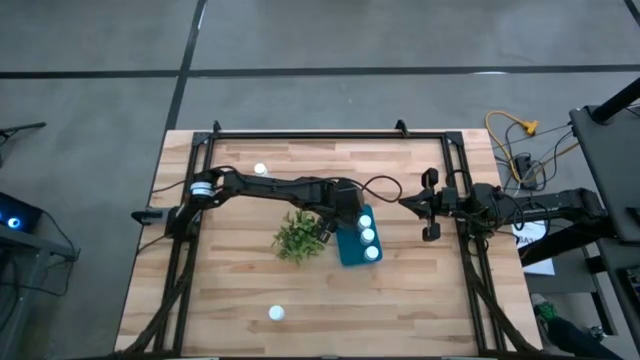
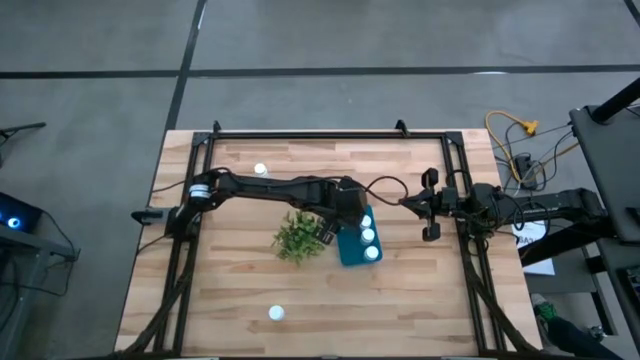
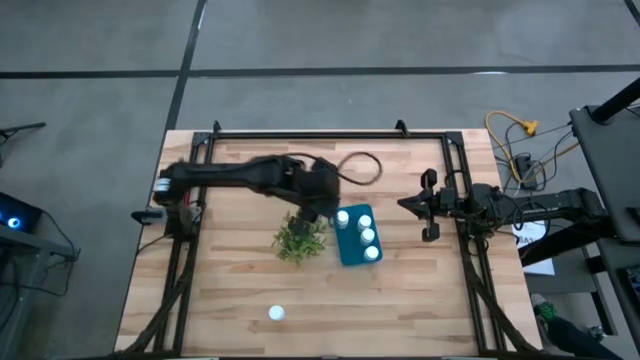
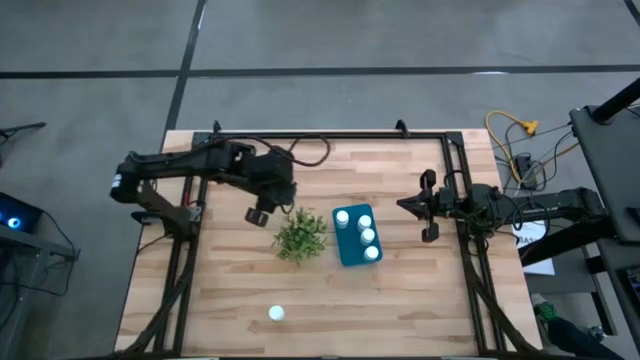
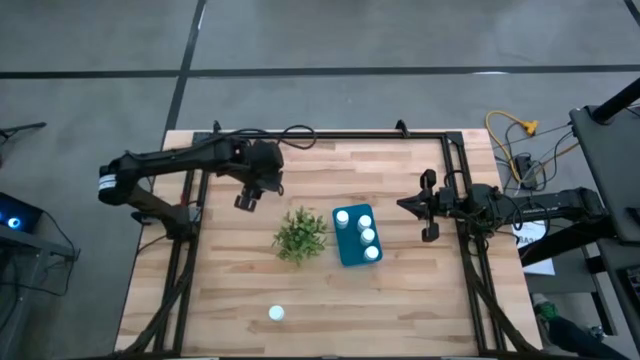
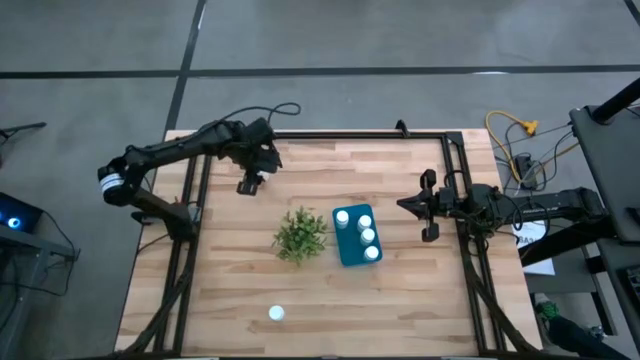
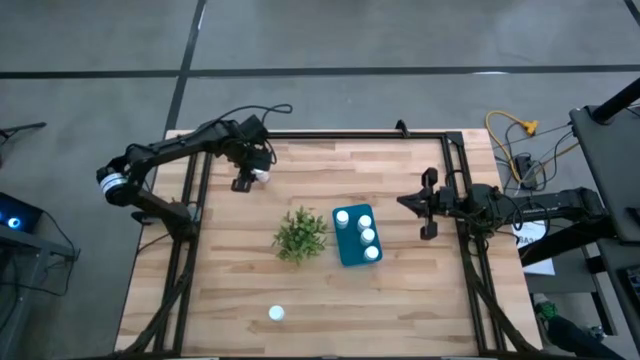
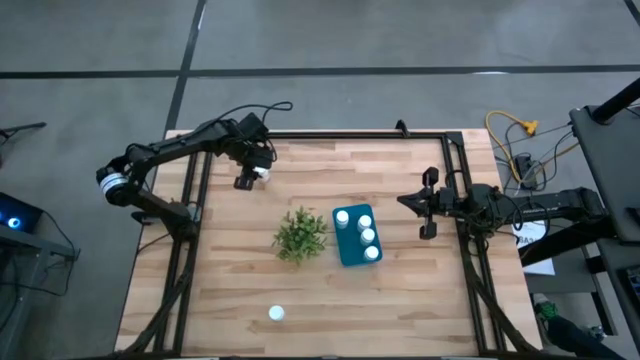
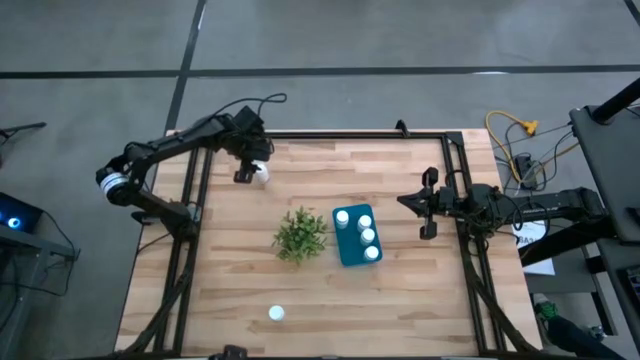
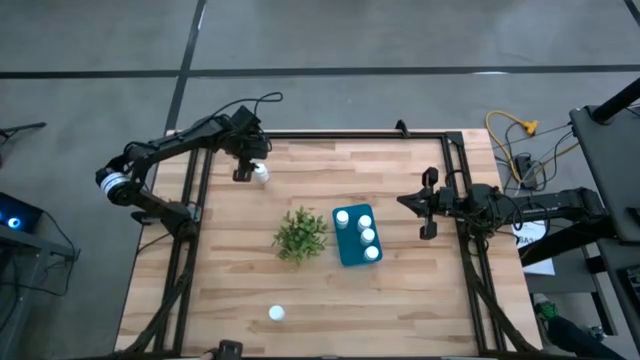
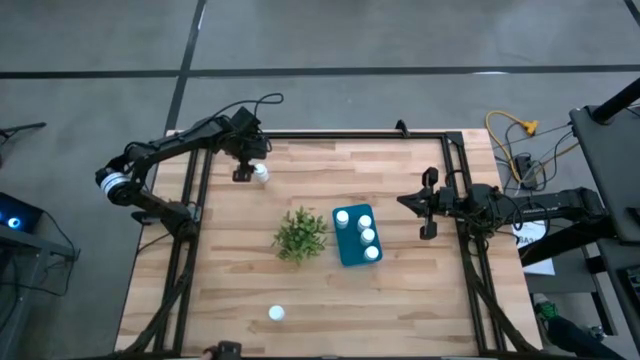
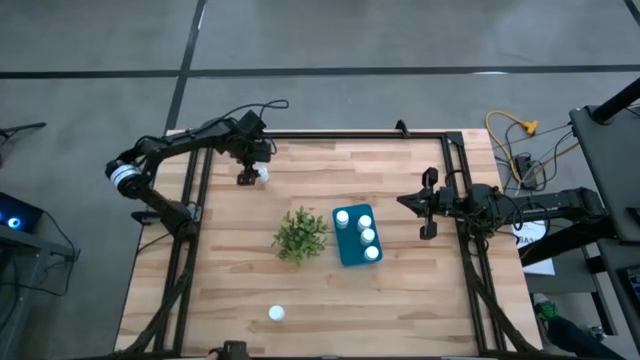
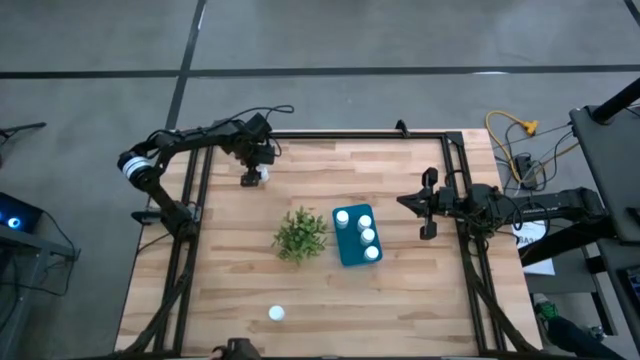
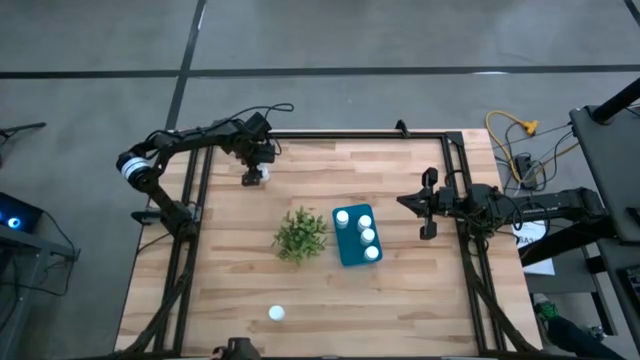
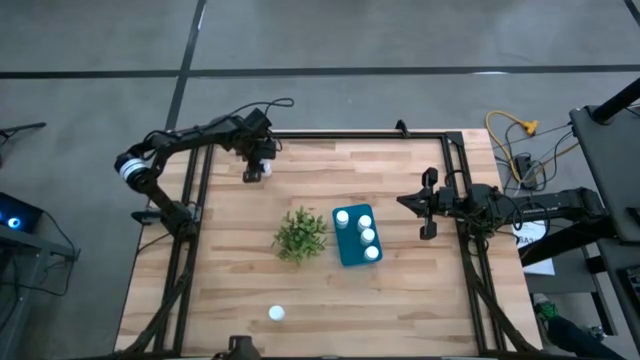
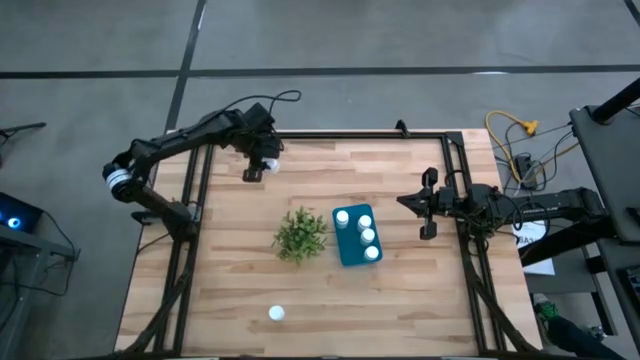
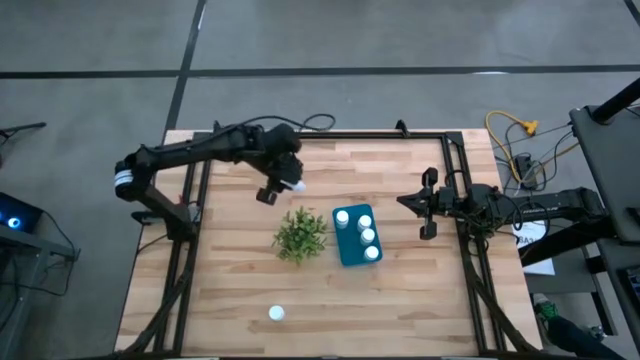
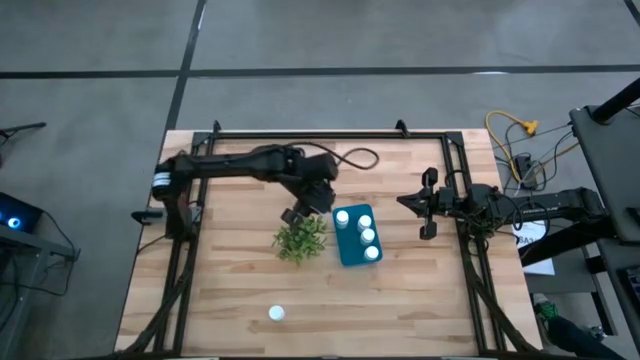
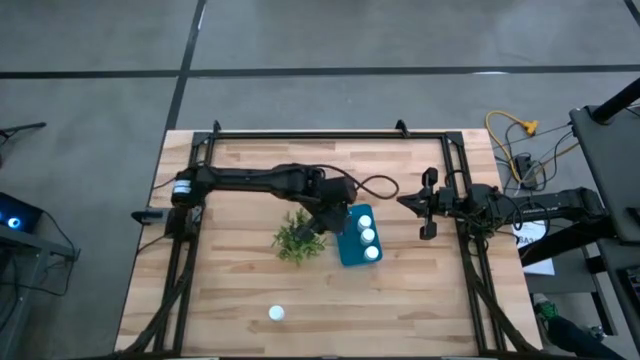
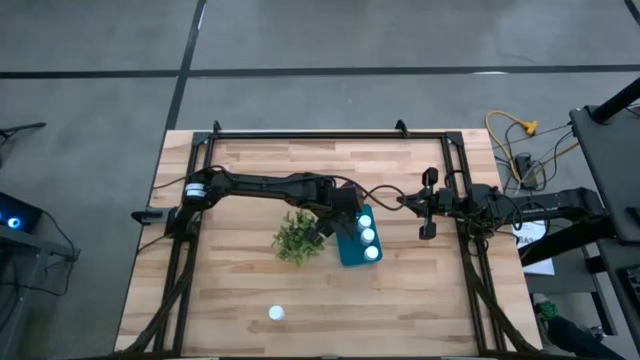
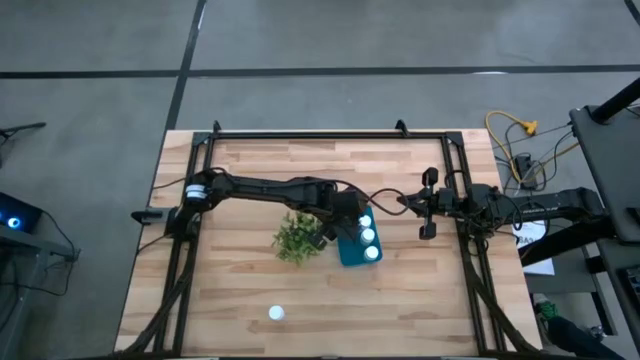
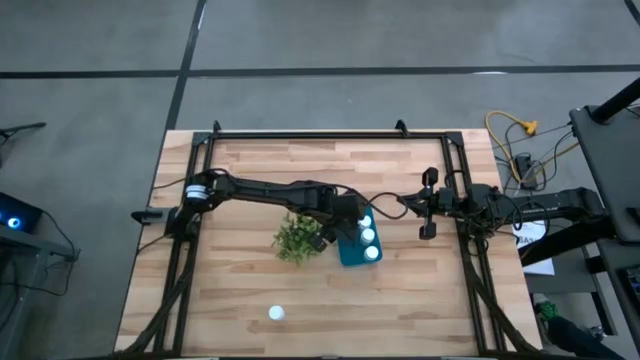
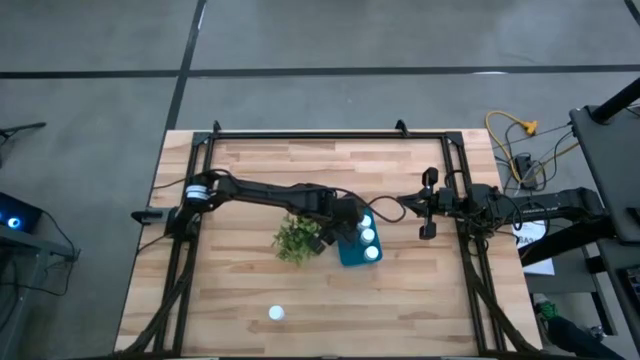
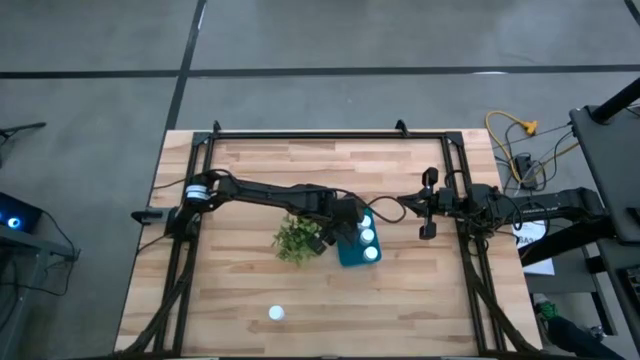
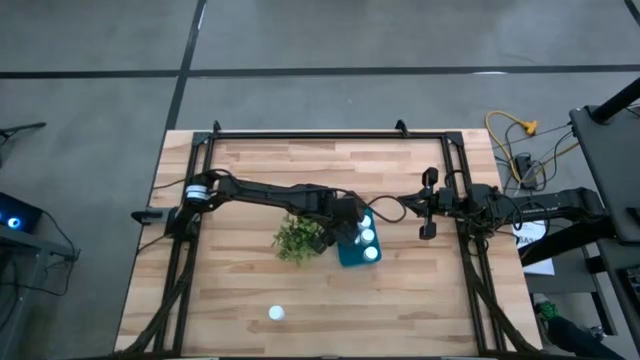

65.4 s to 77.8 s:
Task: Pick and place pill bottles into a basket
Put the white medicine bottle into the blue bin

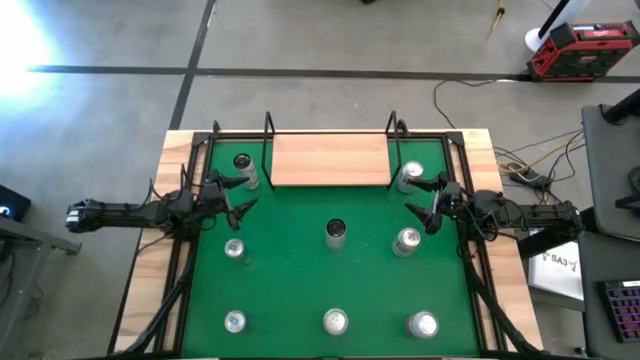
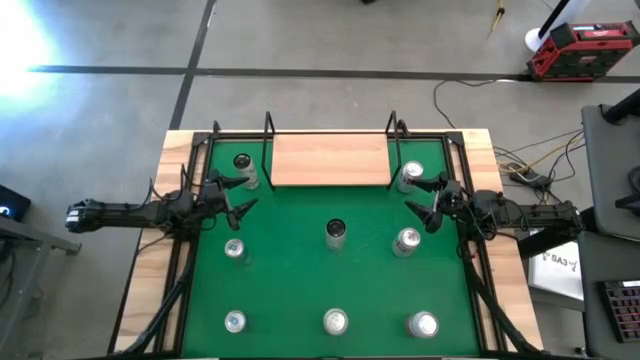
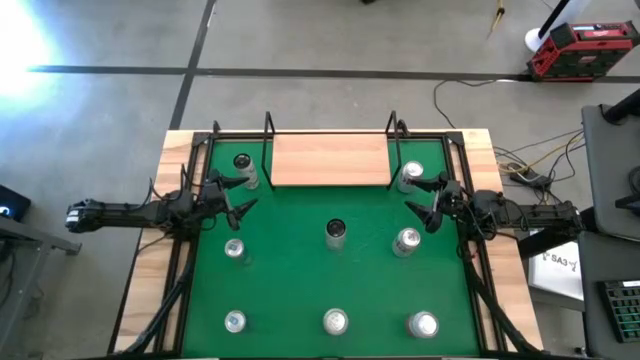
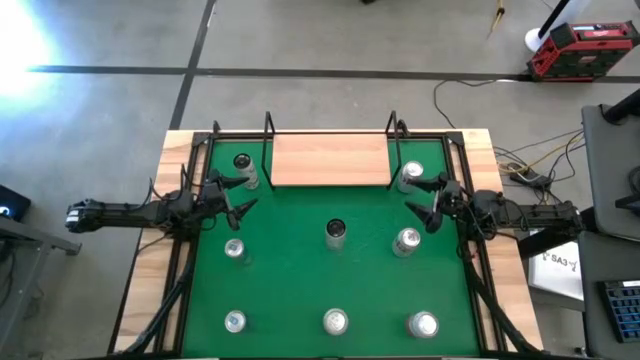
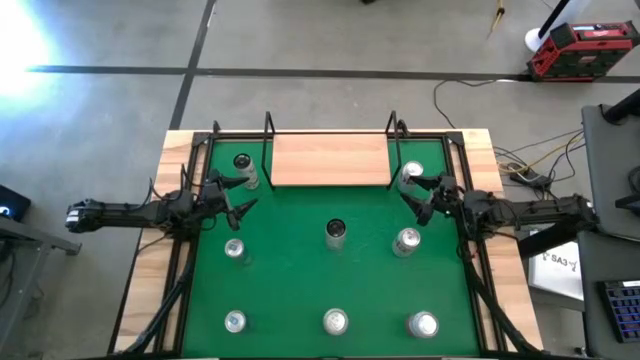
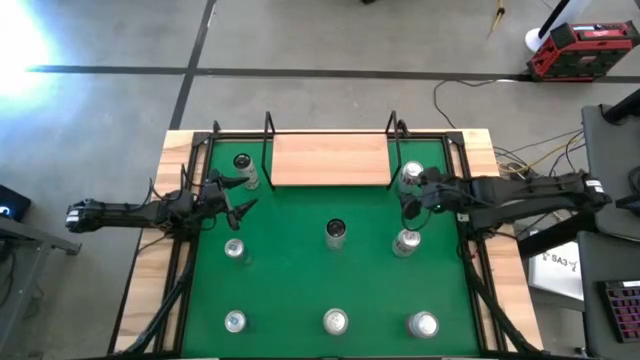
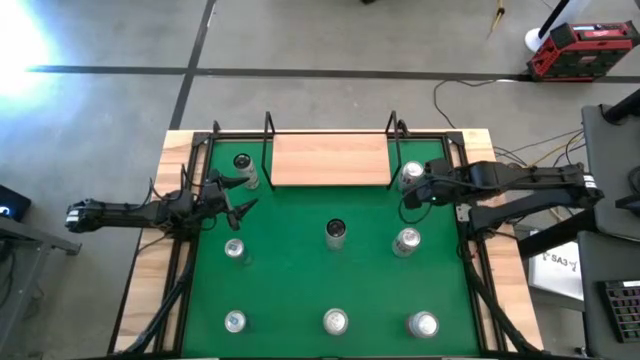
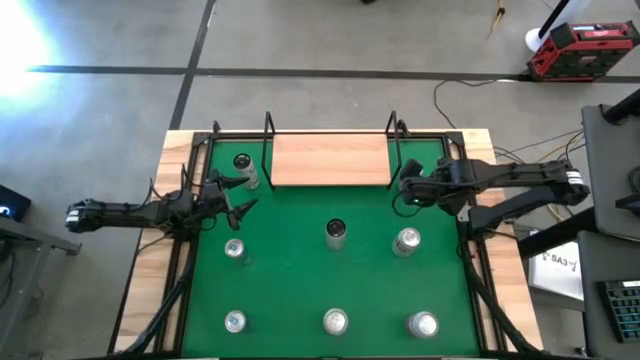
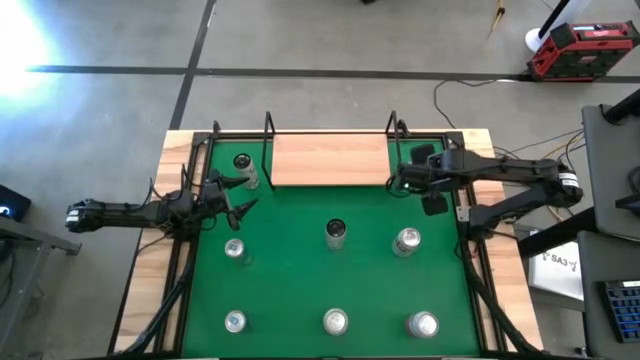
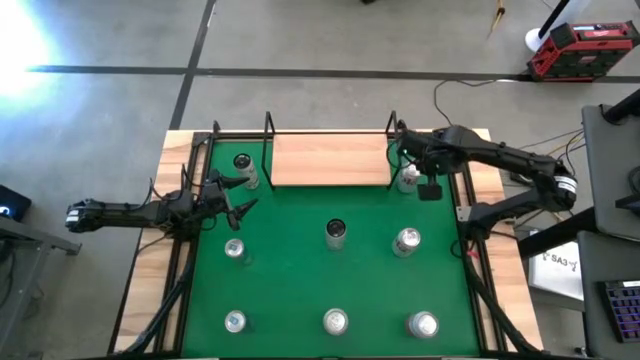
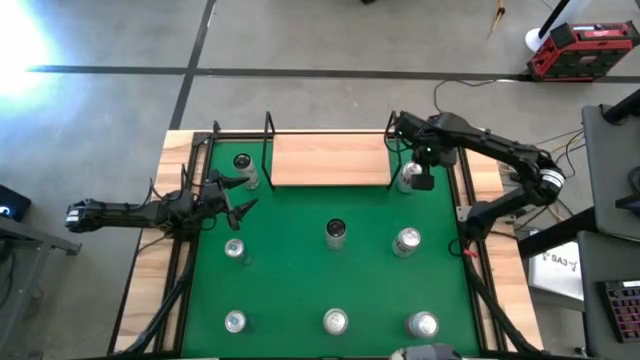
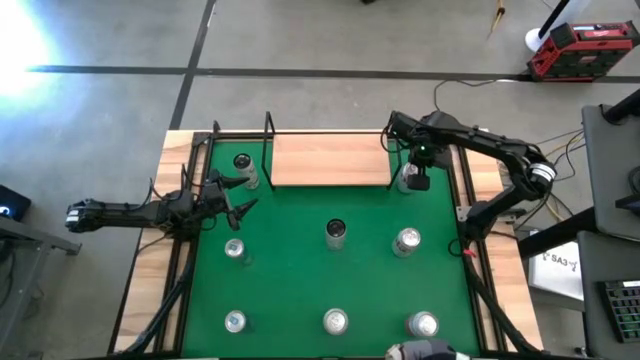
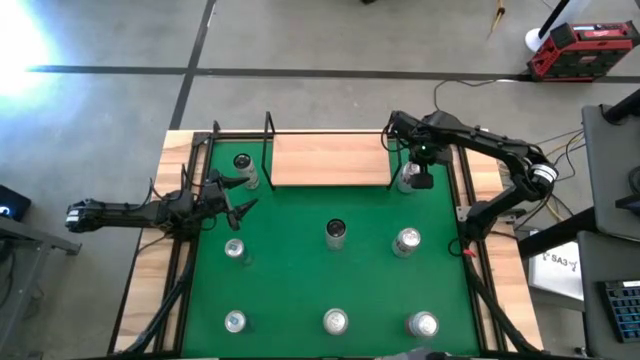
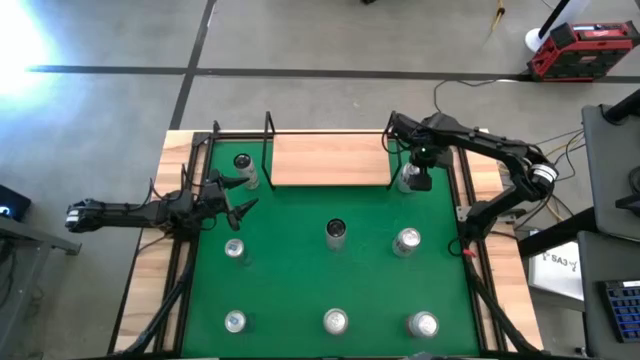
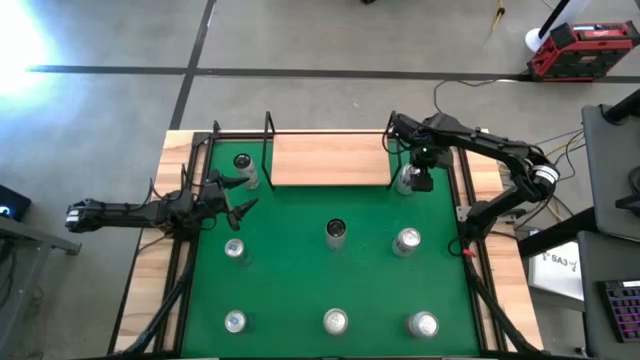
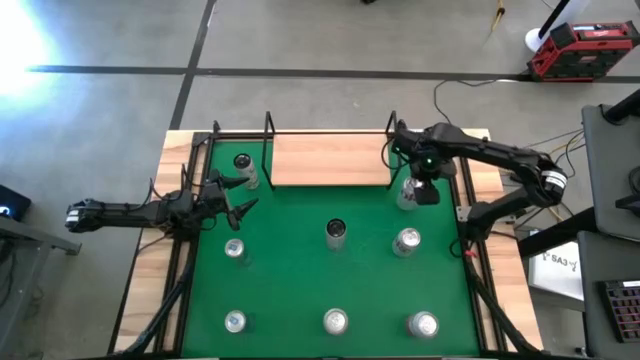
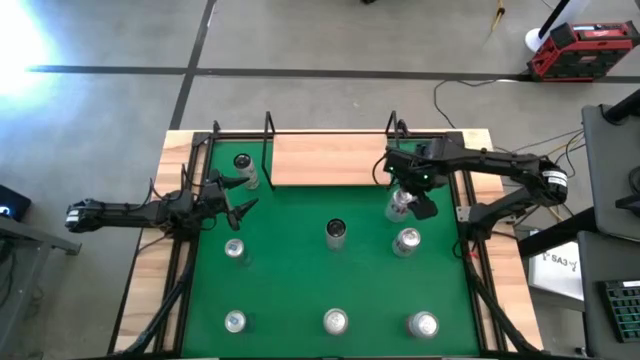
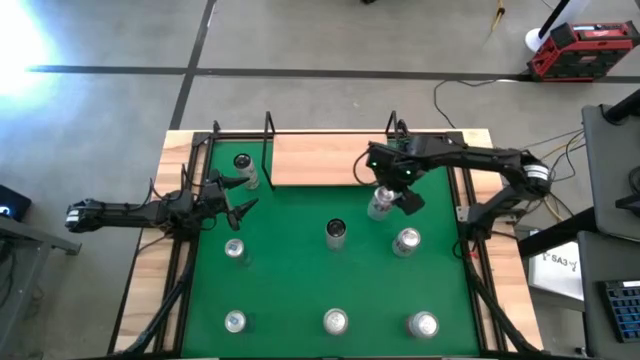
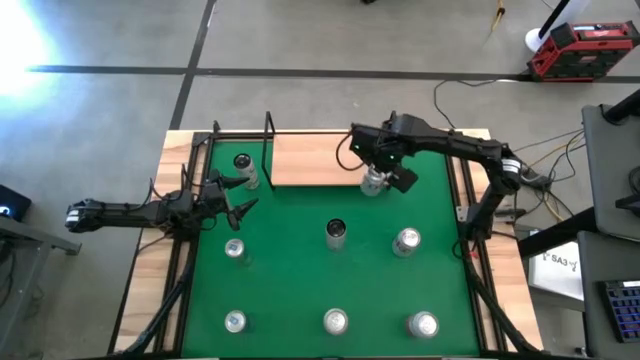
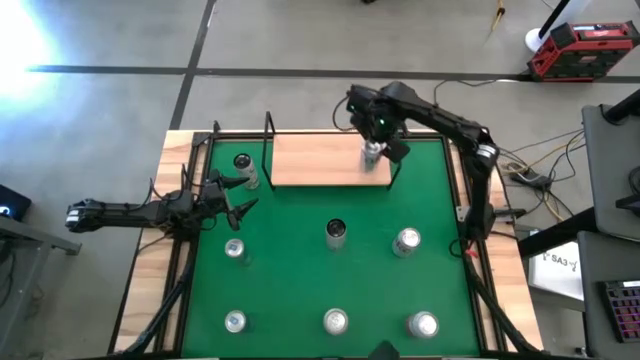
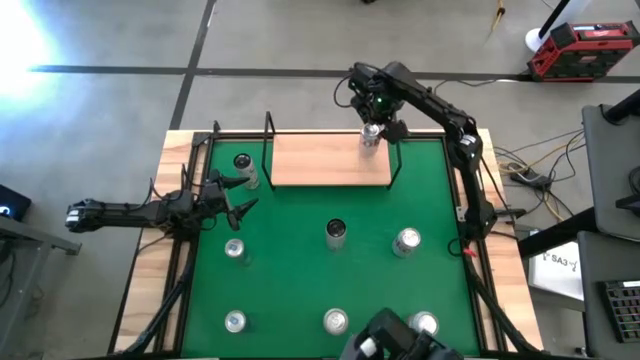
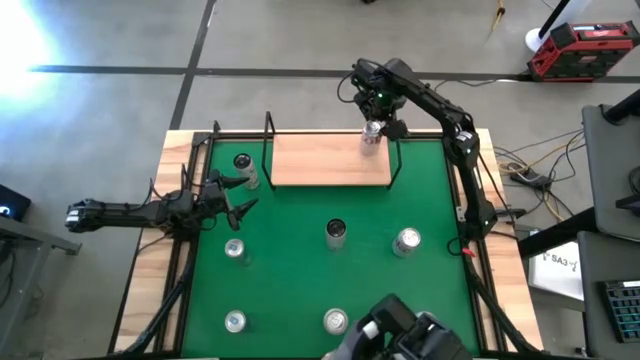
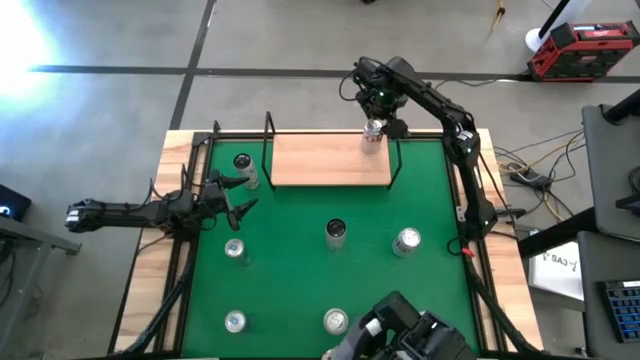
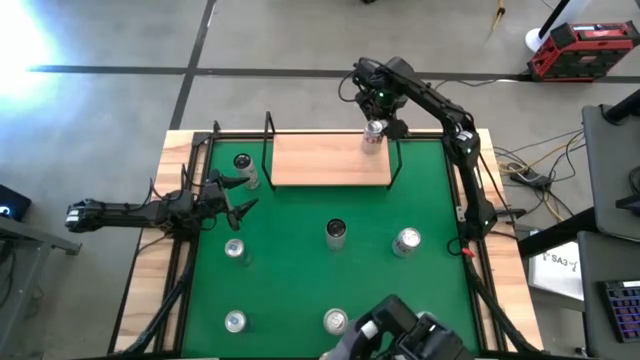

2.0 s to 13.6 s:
Task: Place canned beverage on shelf
Put the top silver soda can on the shelf
